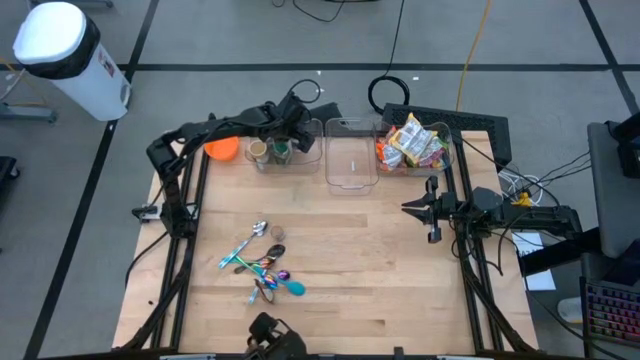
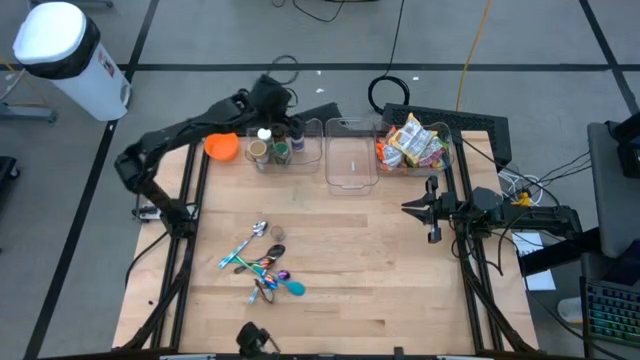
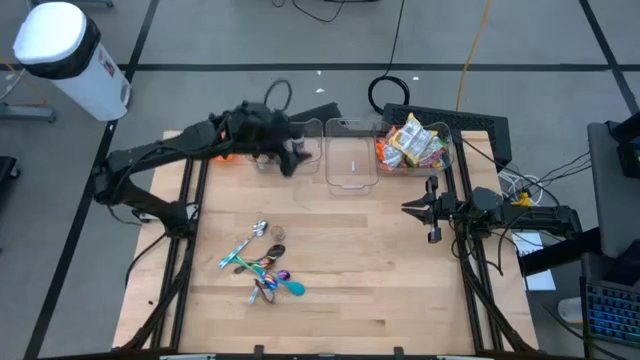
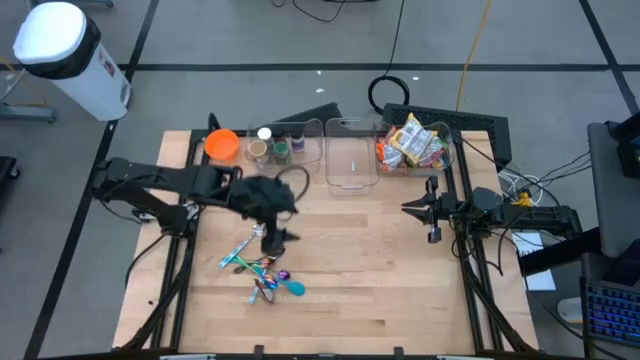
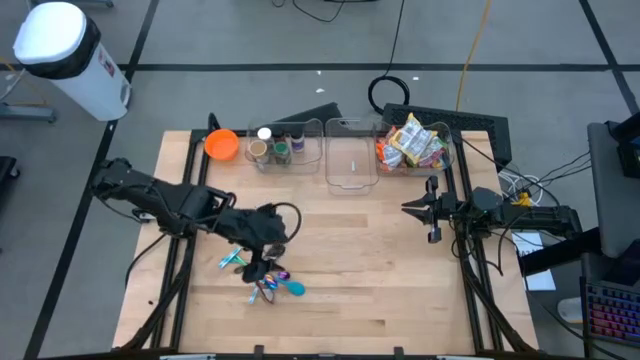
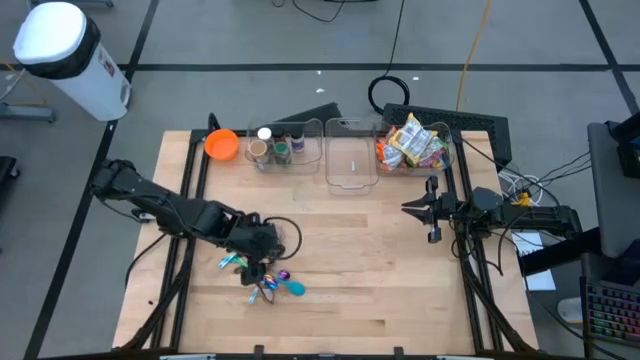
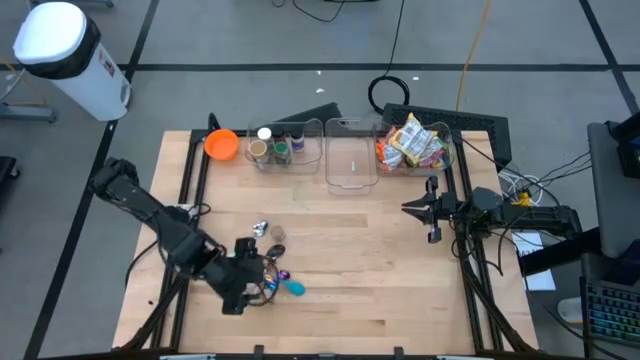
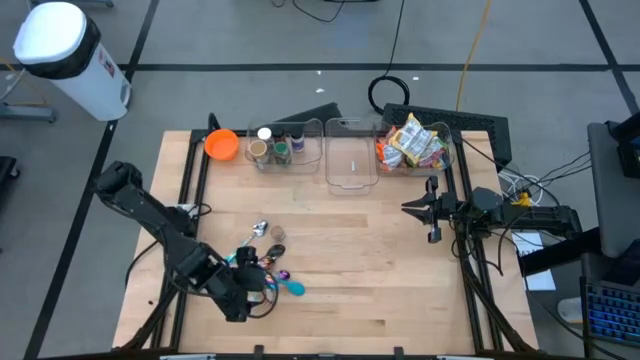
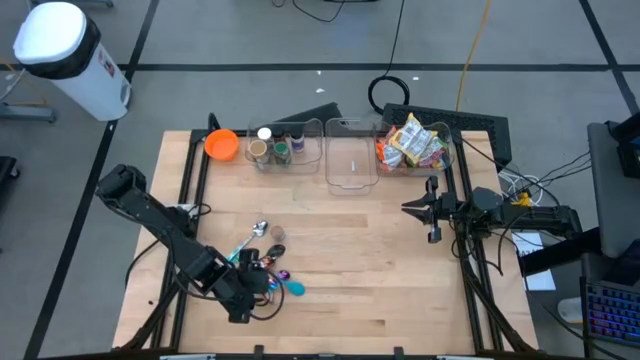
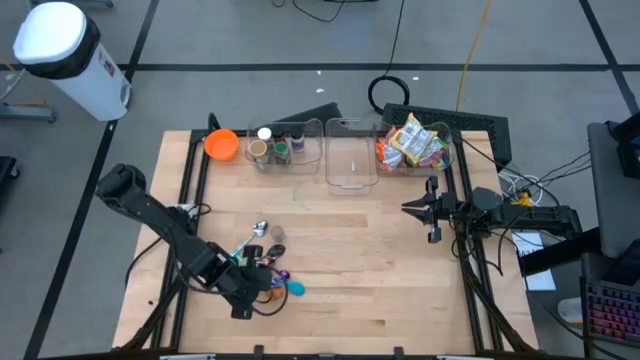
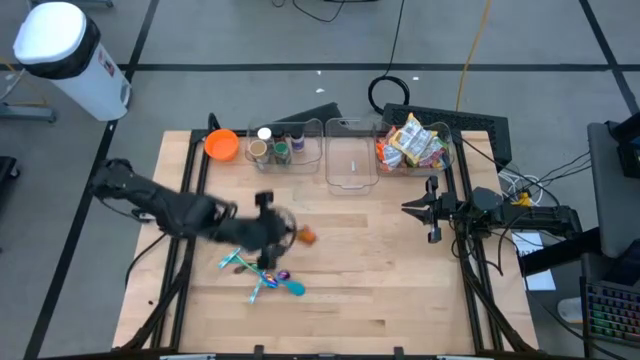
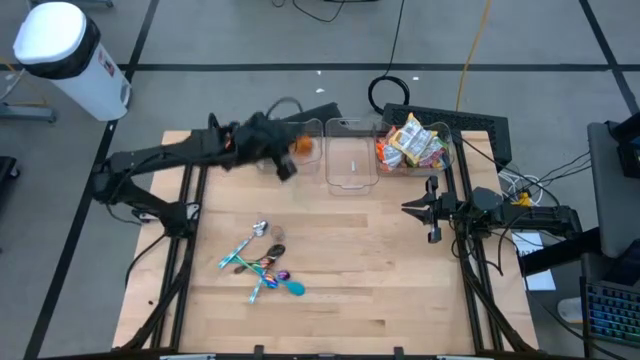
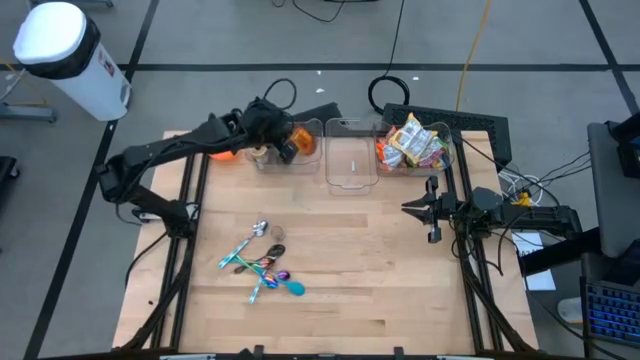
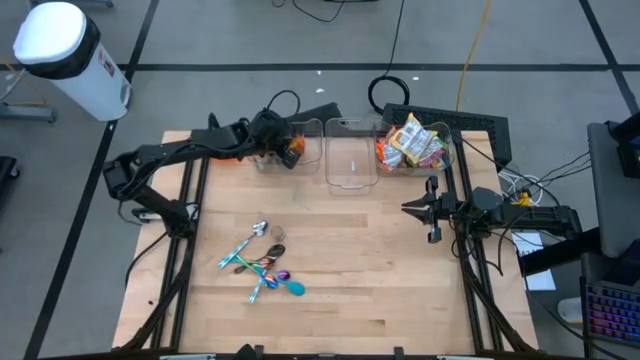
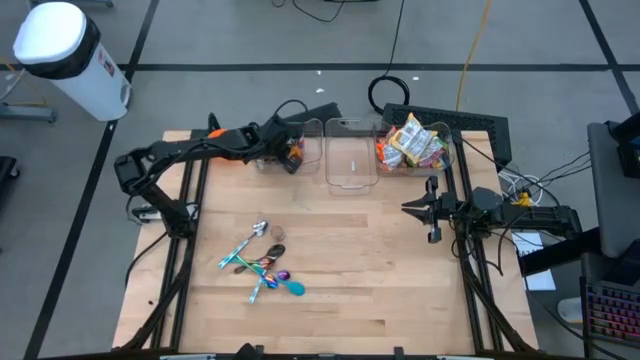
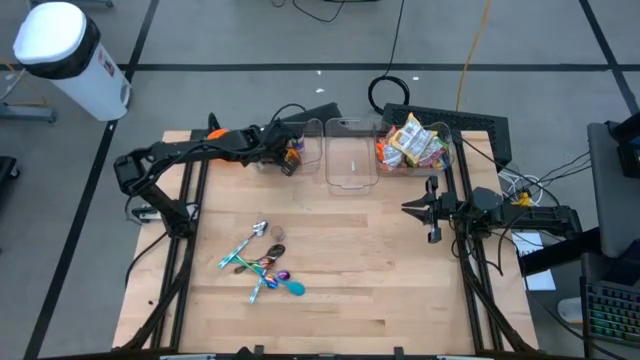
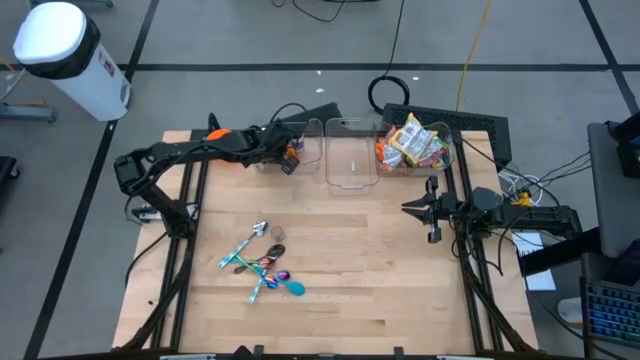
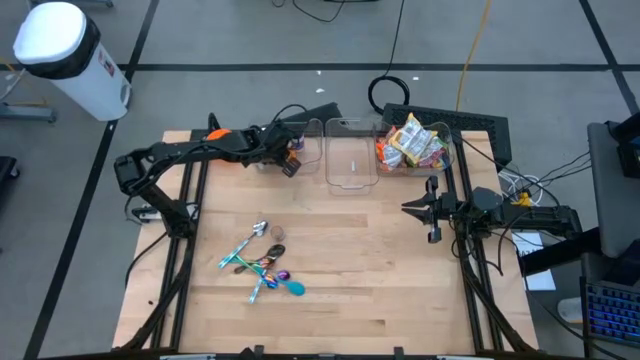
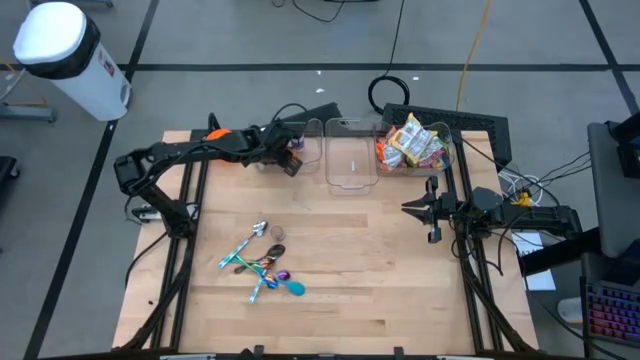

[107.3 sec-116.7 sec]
Task: Pick & Place Food Item
Put the orange seasoning pack into the left transparent bin

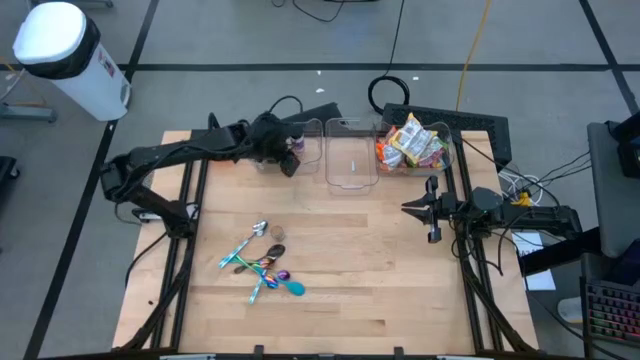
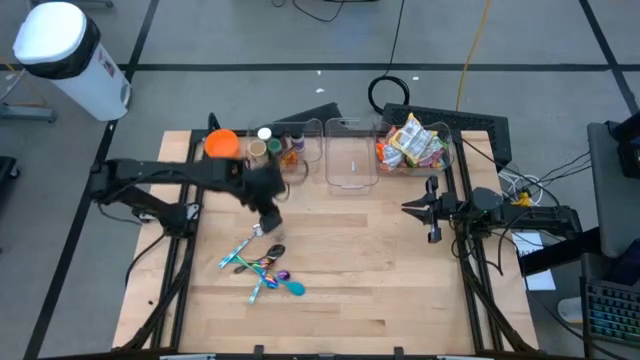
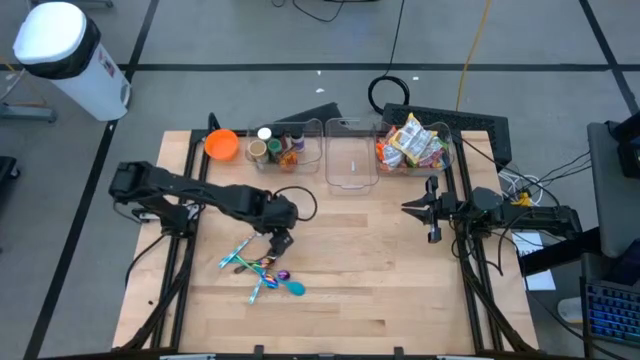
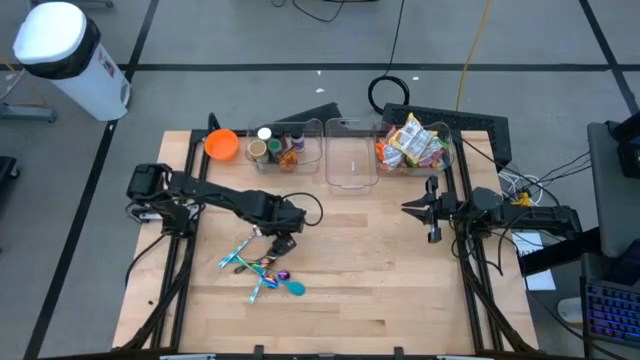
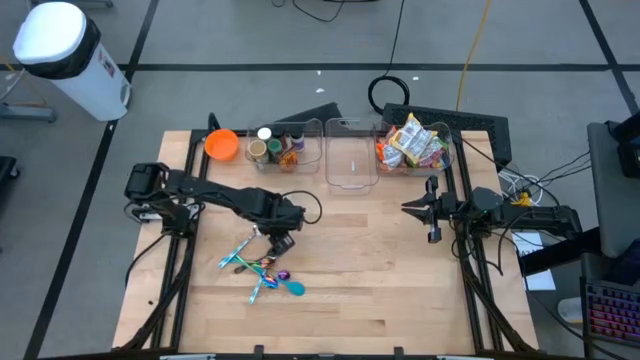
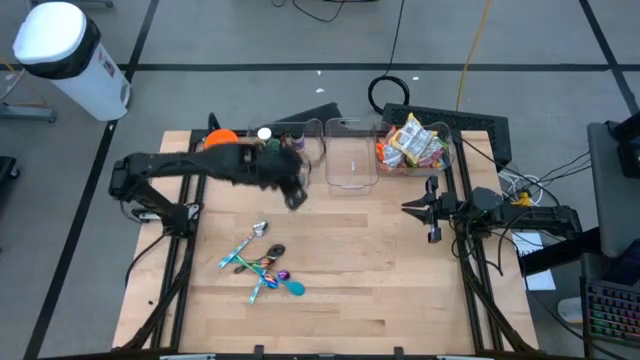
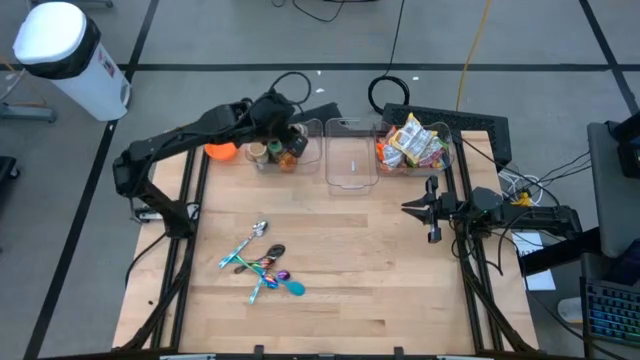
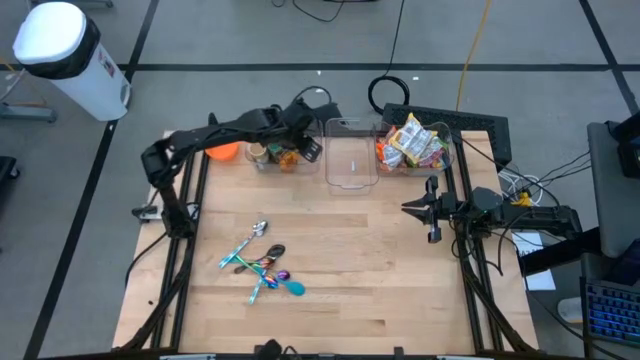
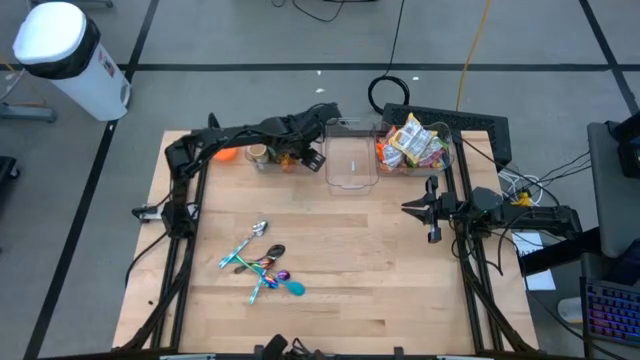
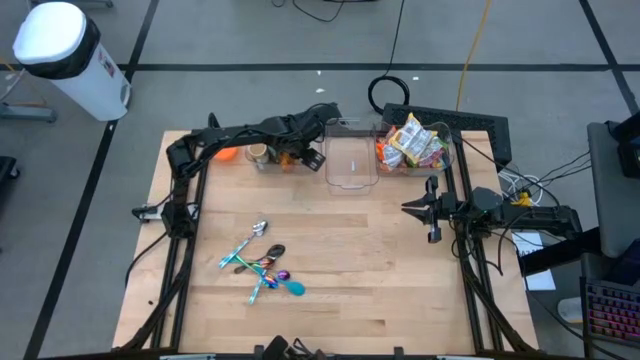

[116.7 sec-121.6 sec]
Put the brown seasoning bottle into the left transparent bin

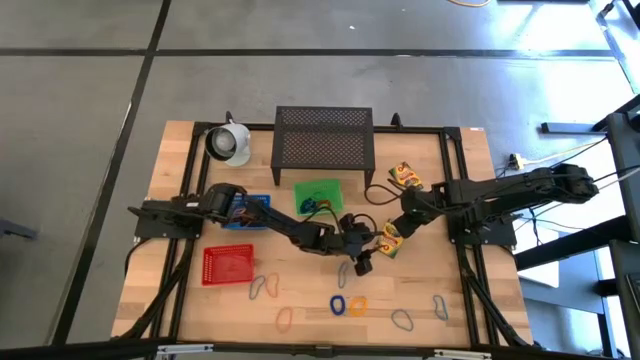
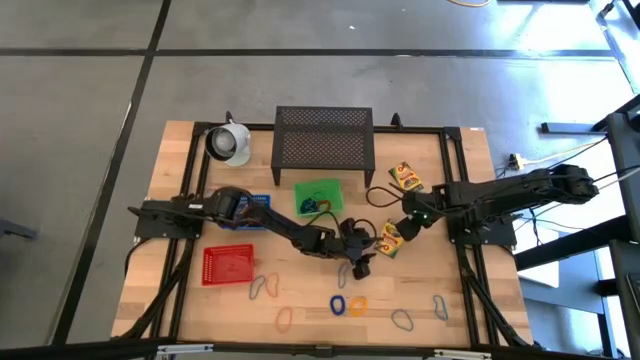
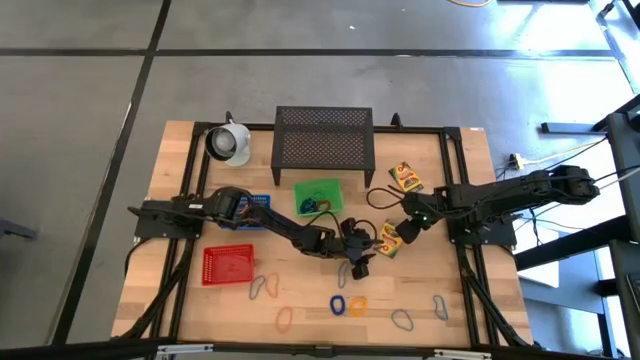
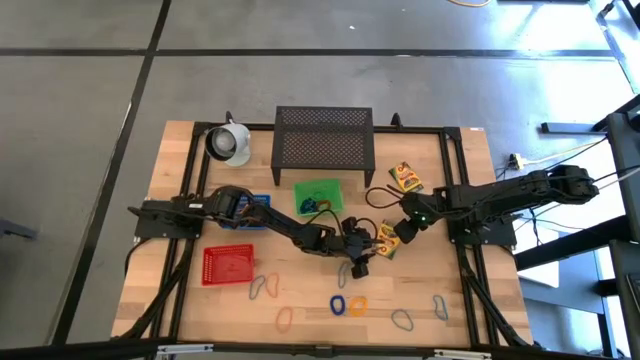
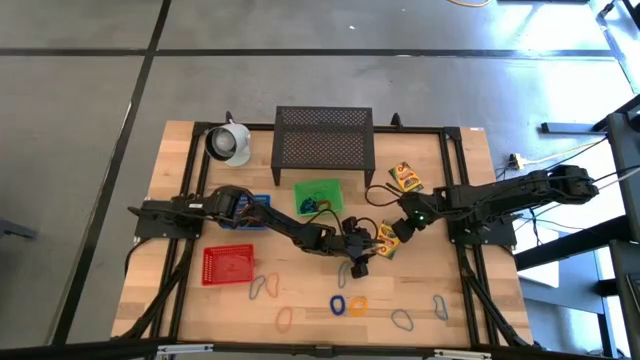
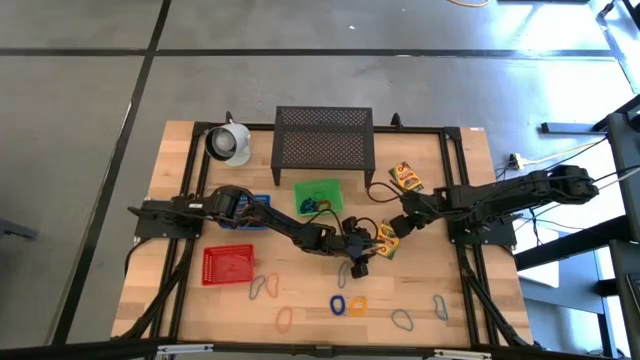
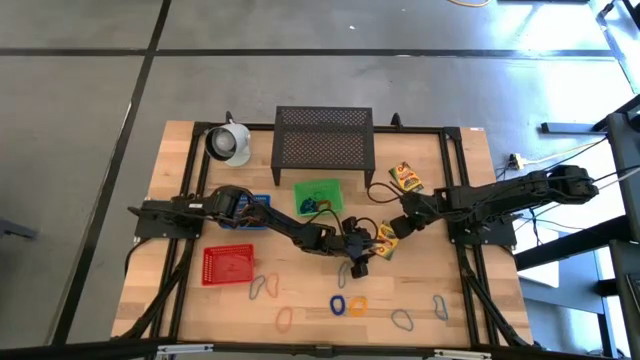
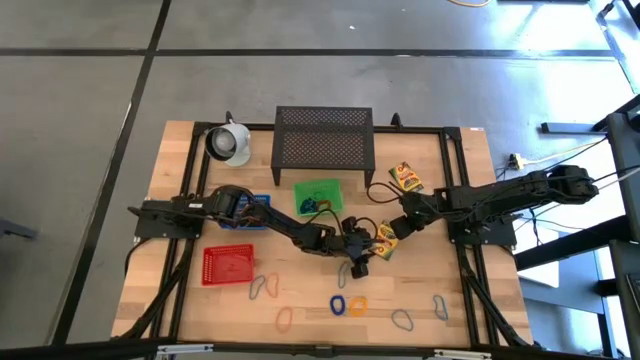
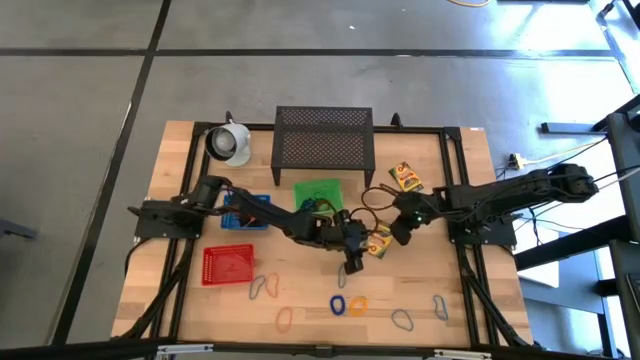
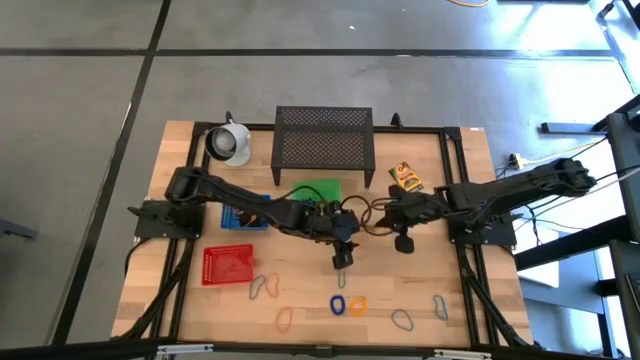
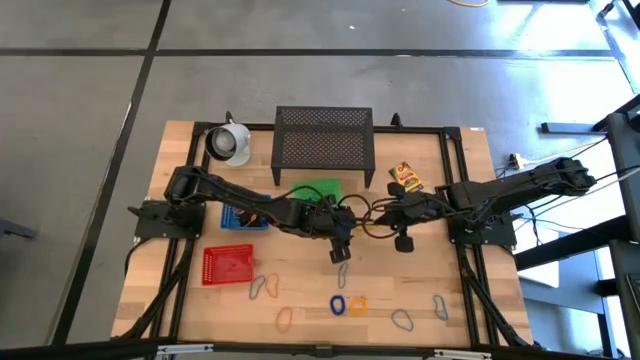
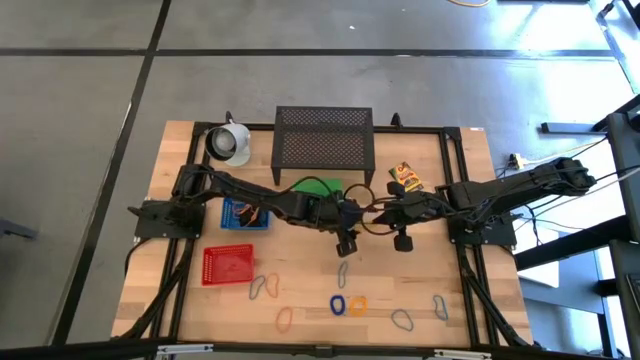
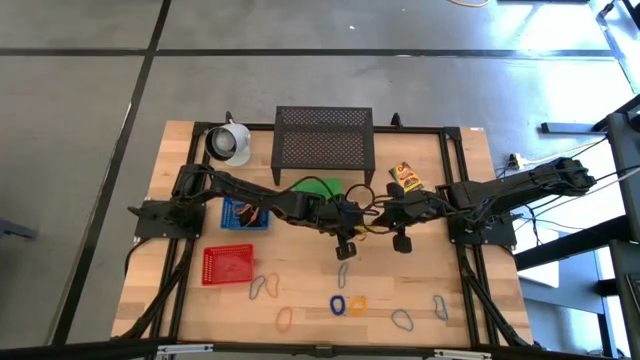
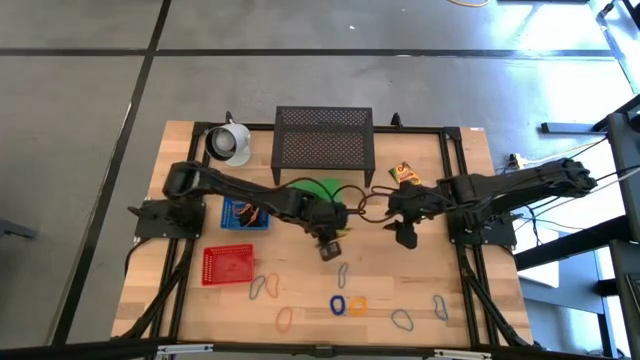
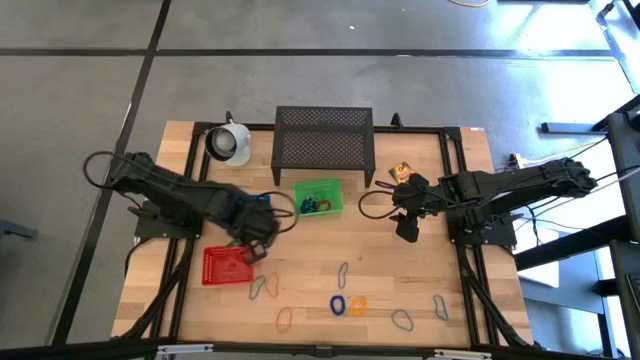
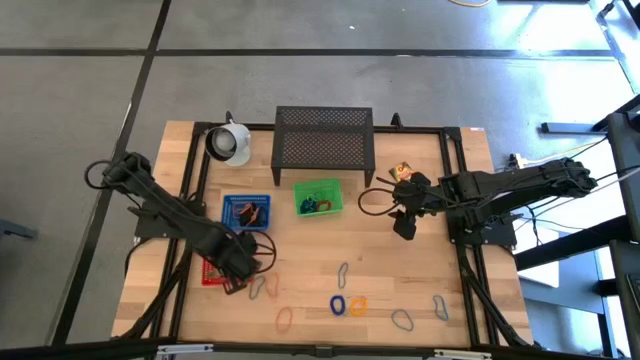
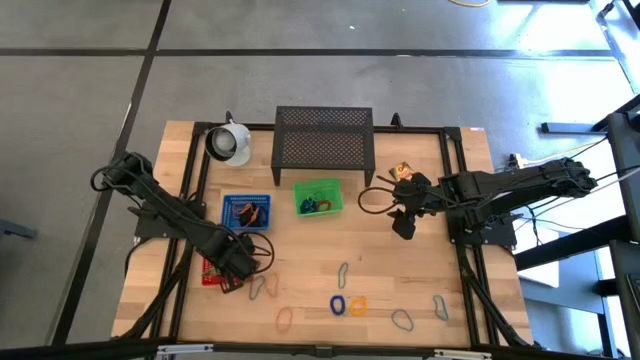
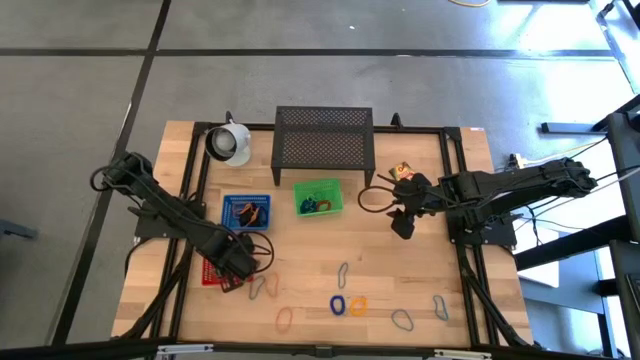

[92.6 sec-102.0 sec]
Task: Pick & Place Office Desk Supplies
Put the bottom yellow box of crayon into the red bin
